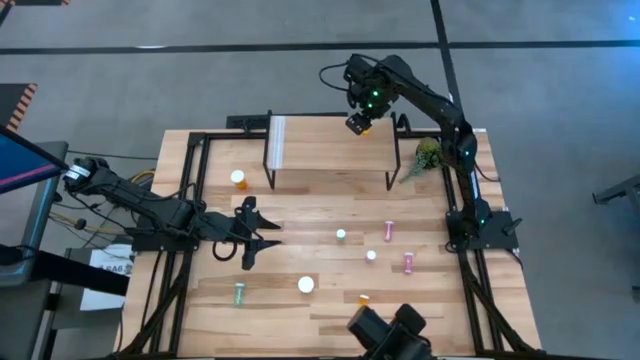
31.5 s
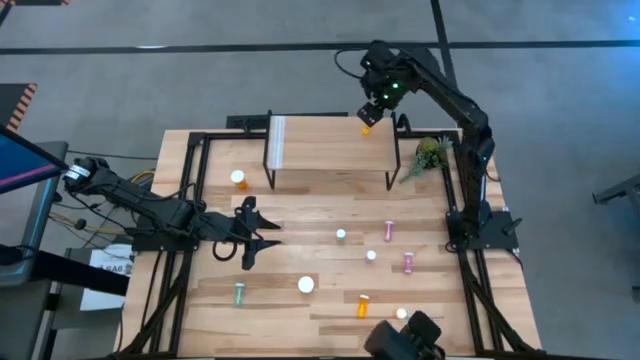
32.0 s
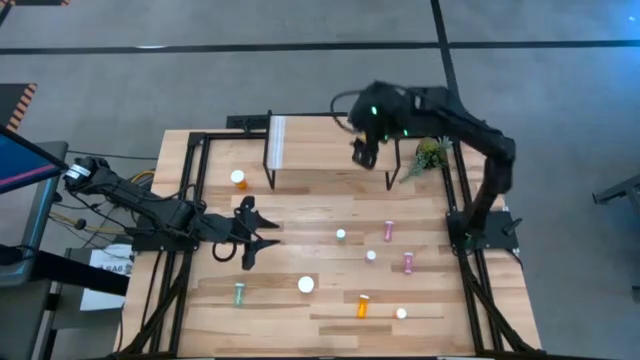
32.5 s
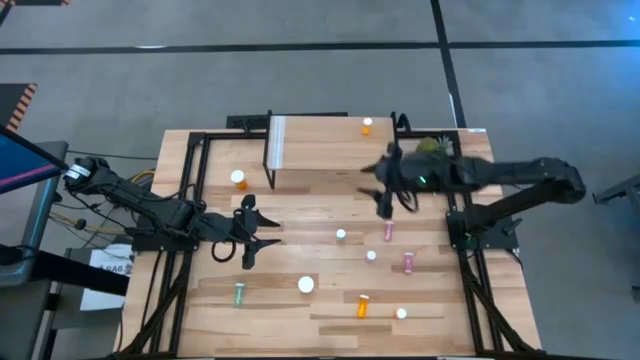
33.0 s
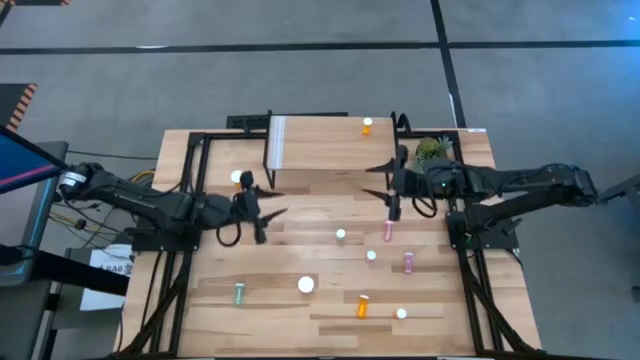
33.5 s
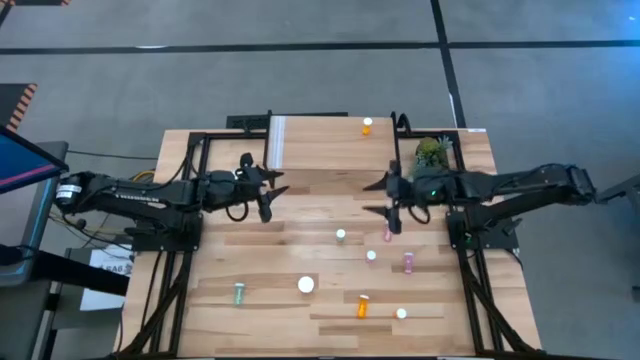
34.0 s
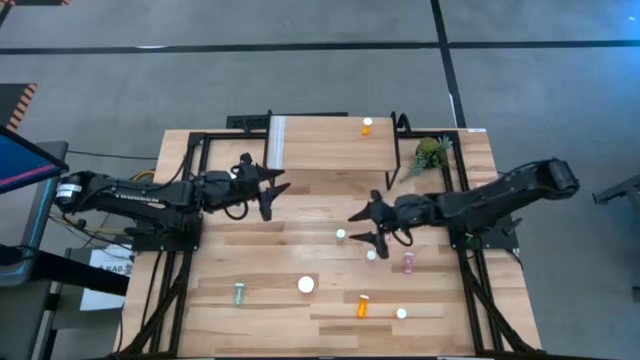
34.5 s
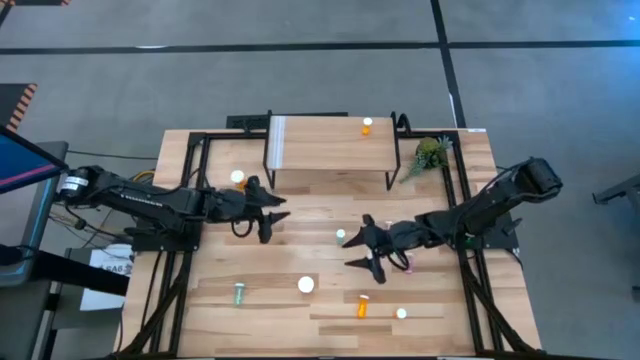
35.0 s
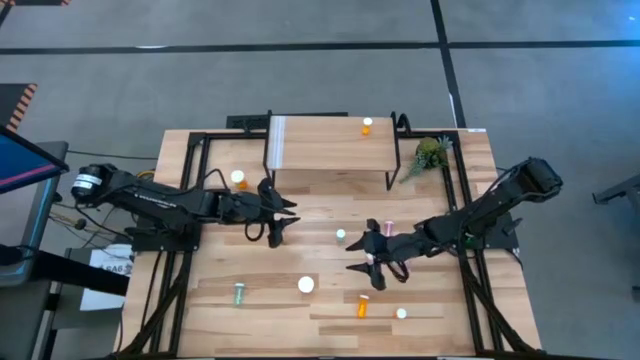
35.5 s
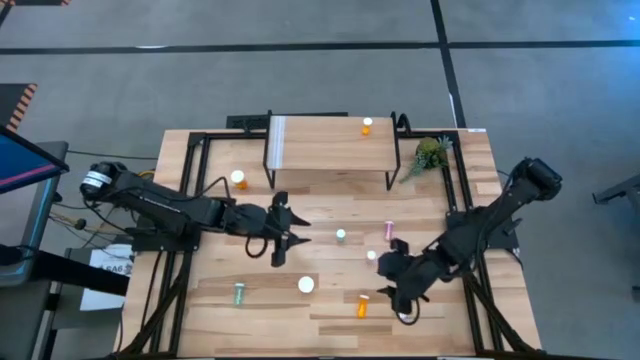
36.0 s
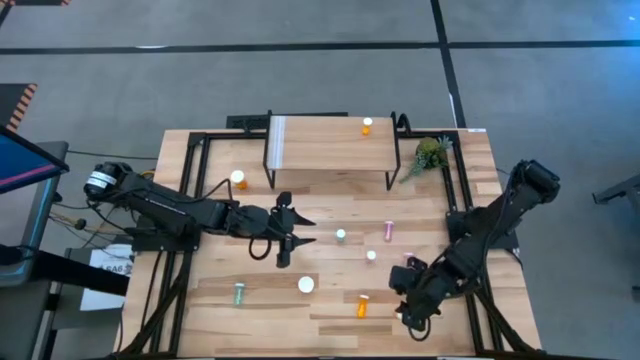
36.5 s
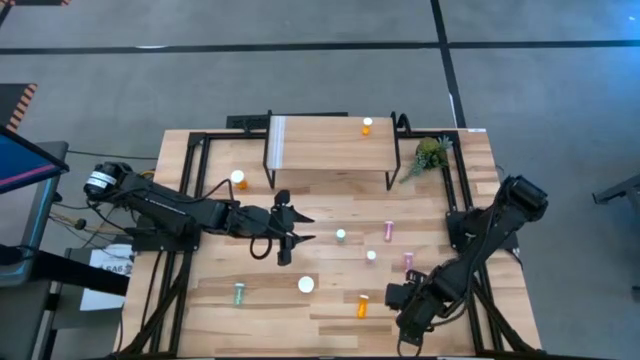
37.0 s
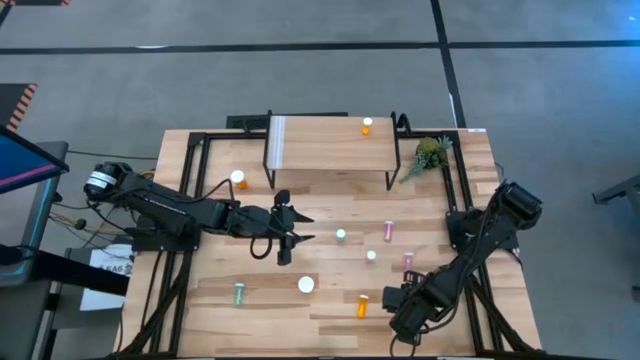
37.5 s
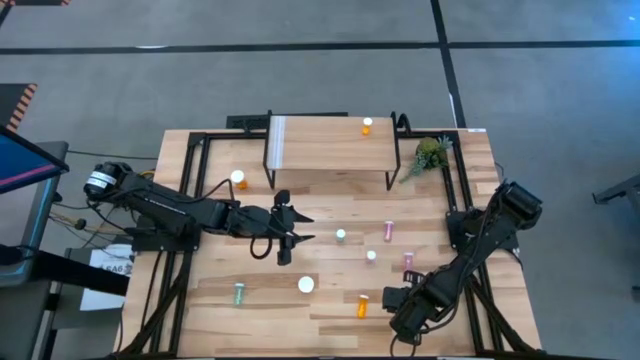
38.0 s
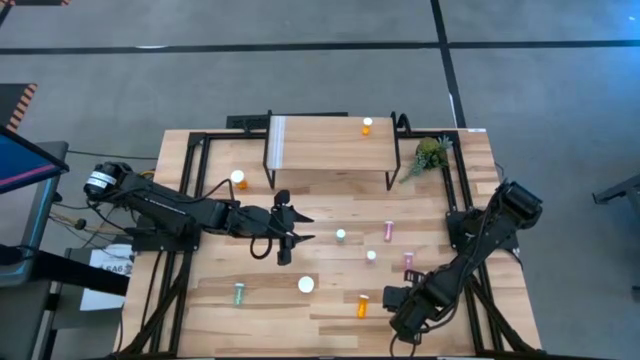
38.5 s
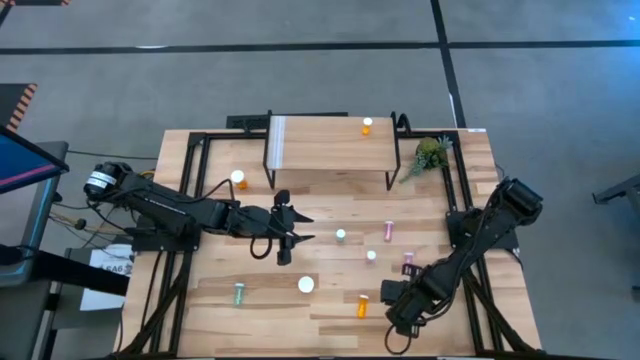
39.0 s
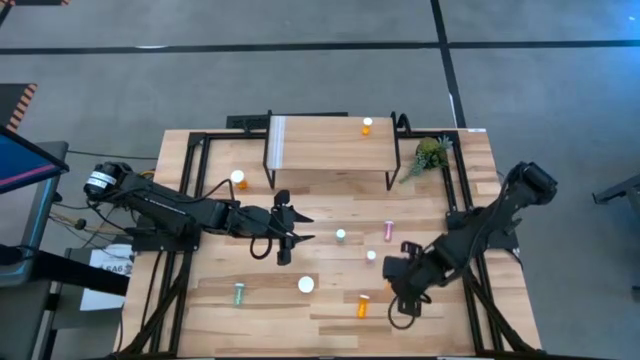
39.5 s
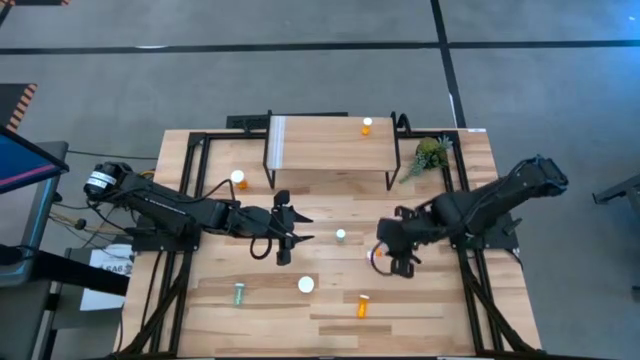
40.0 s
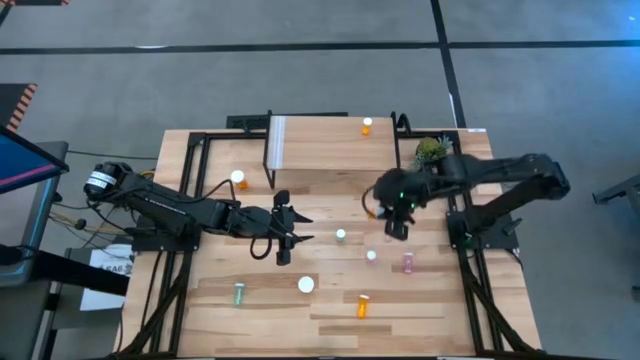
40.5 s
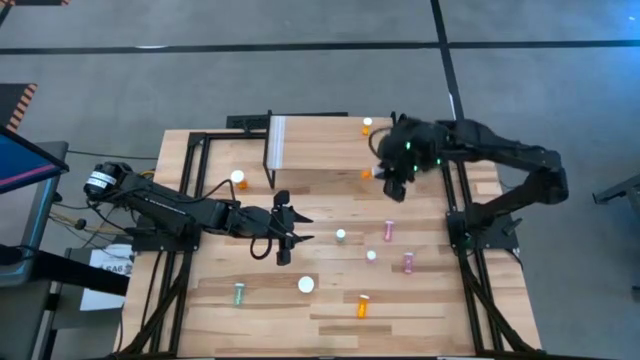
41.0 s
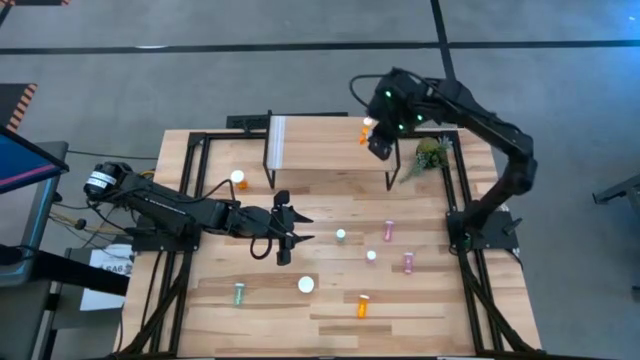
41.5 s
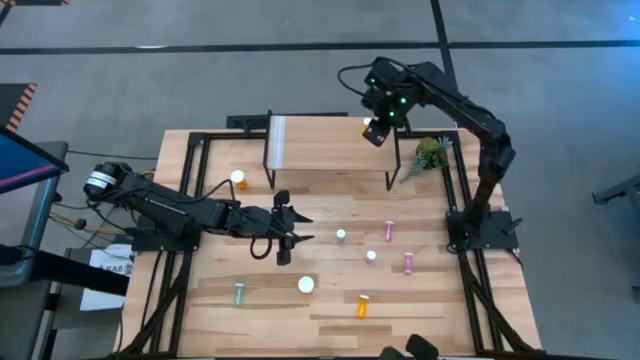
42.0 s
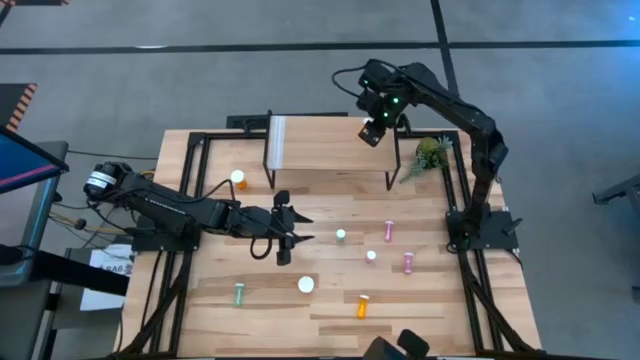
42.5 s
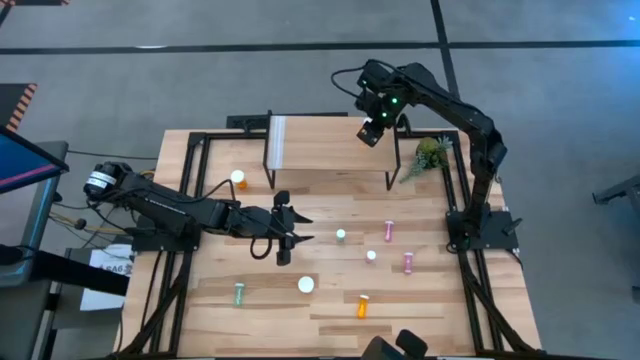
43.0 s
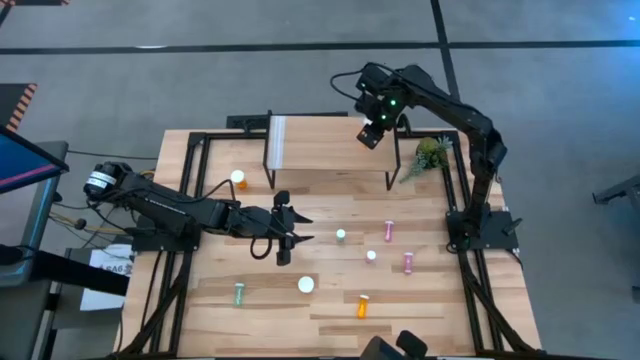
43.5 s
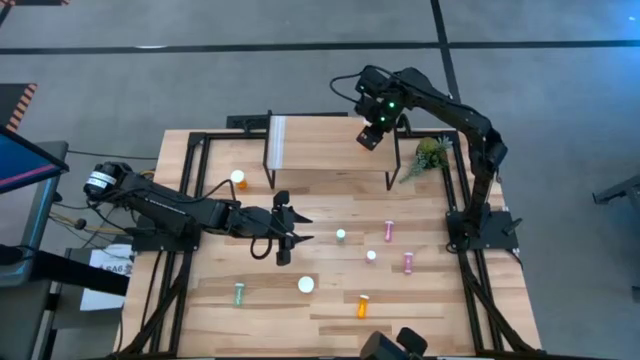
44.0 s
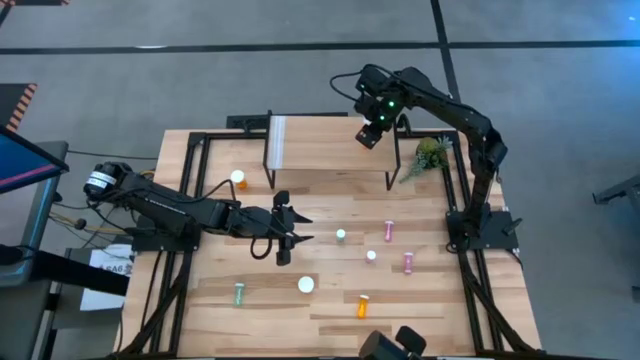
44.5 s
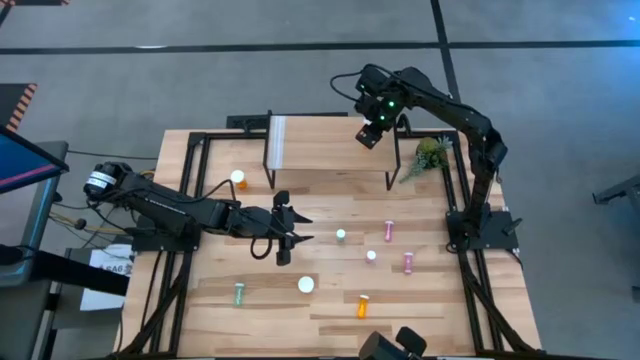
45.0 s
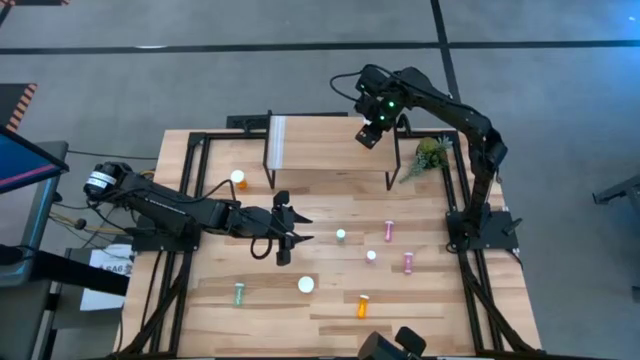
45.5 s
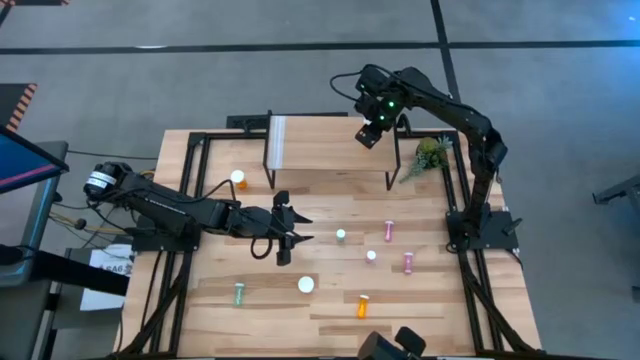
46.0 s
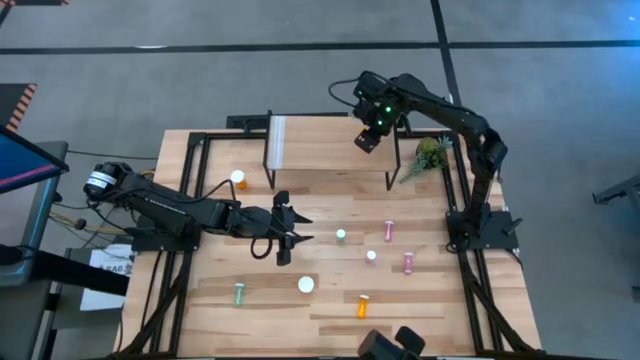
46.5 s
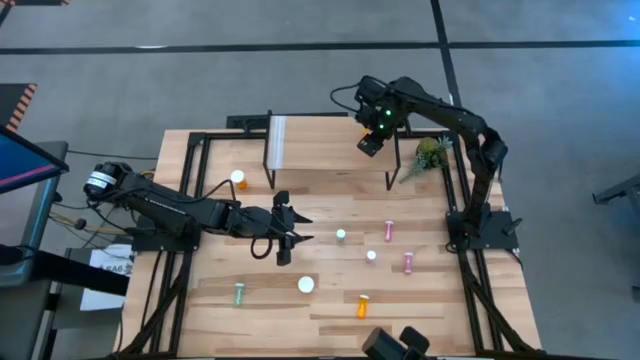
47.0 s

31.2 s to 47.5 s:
Task: Pick and place medicine bottles onto shelf by color
Put the right small orange pill bottle on the shelf aligned with the small orange pill bottle

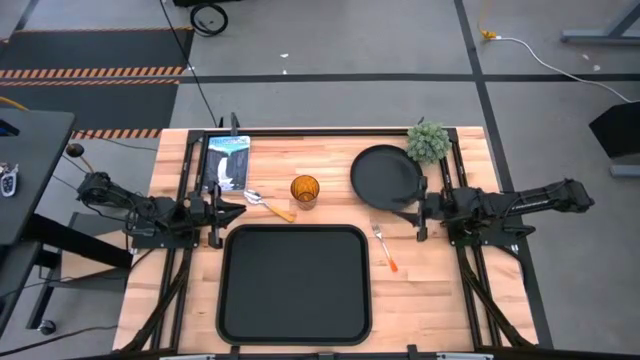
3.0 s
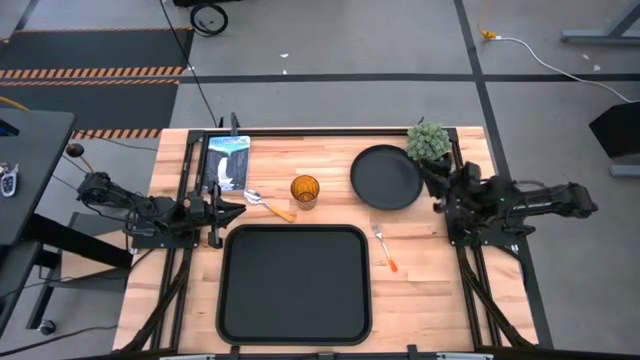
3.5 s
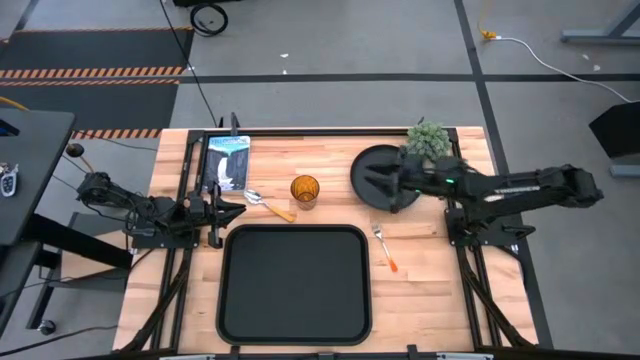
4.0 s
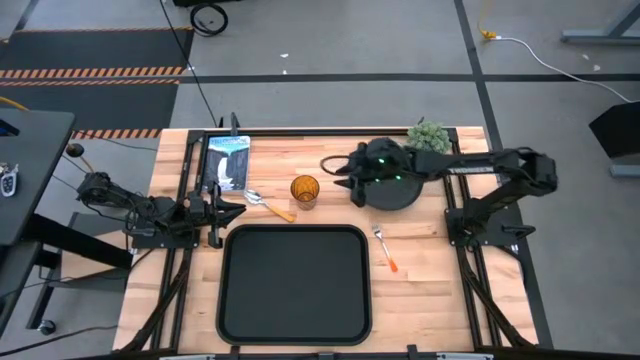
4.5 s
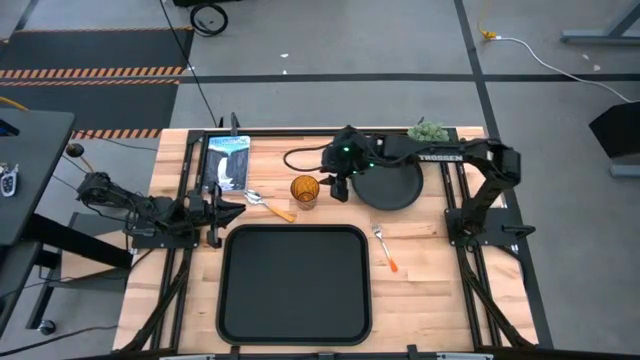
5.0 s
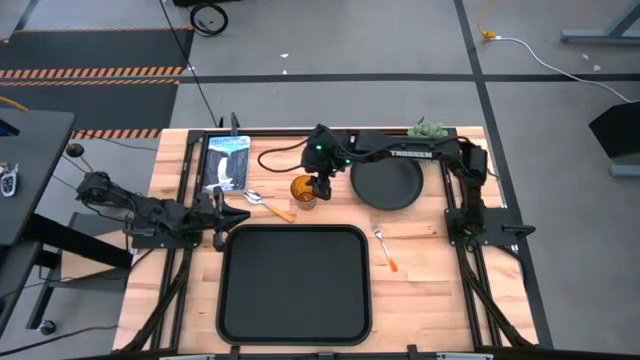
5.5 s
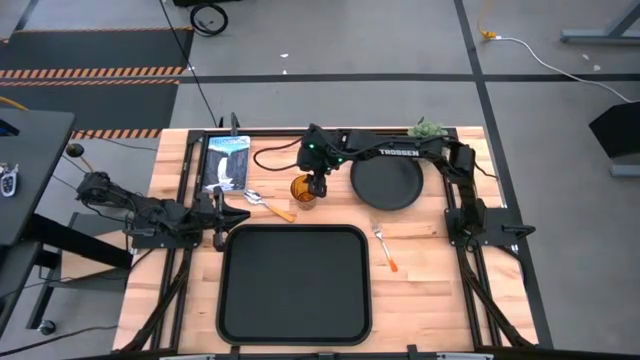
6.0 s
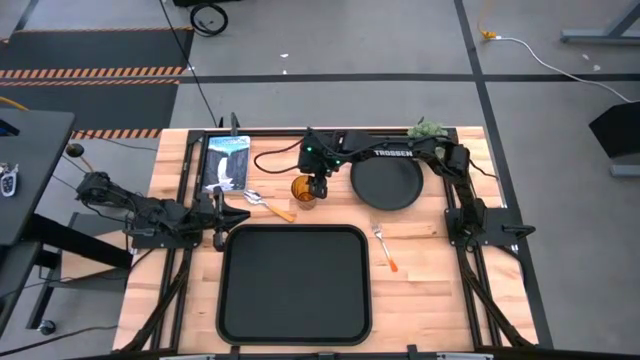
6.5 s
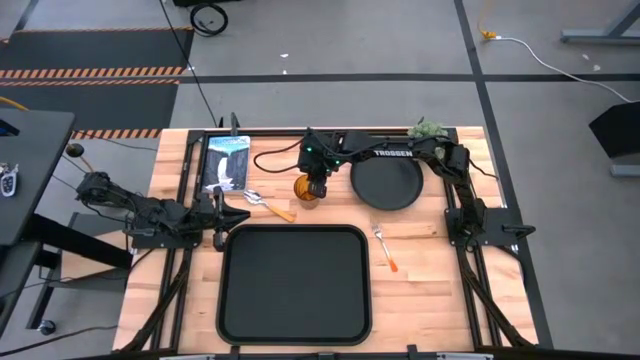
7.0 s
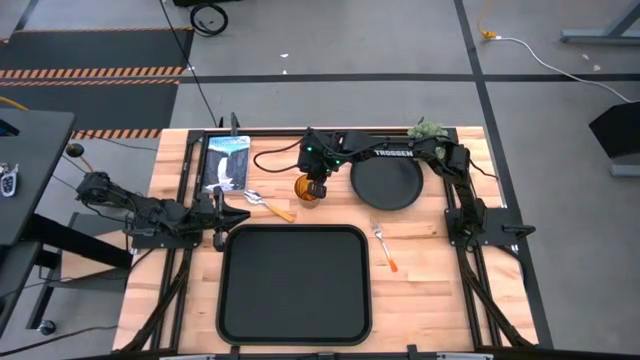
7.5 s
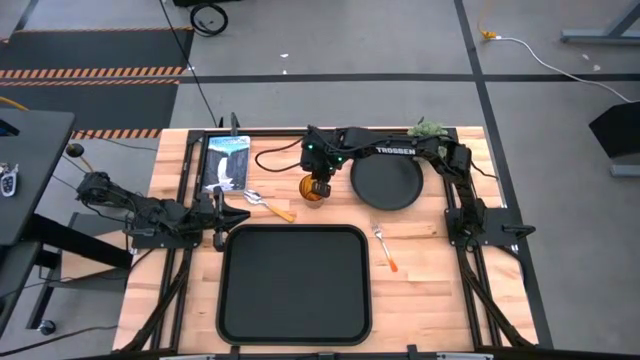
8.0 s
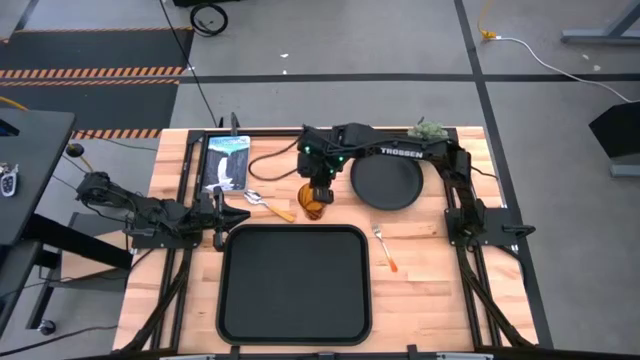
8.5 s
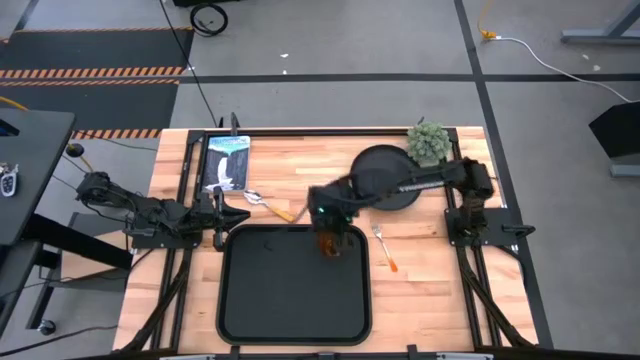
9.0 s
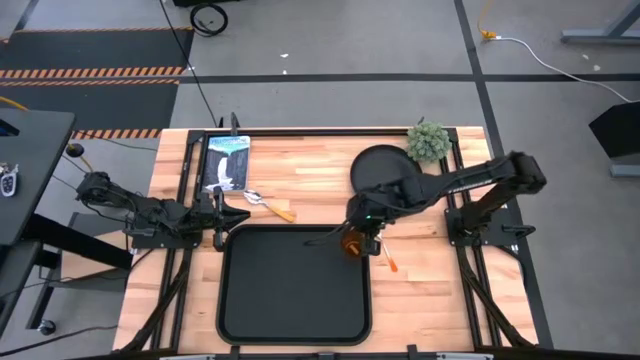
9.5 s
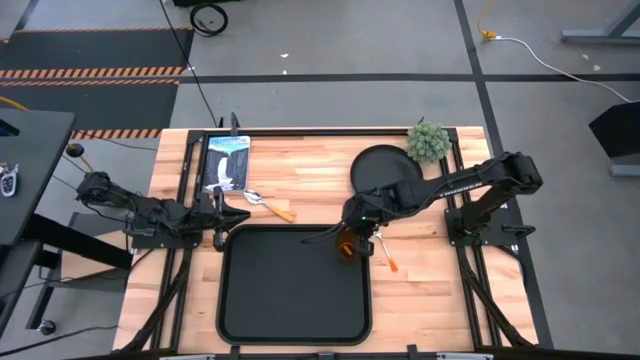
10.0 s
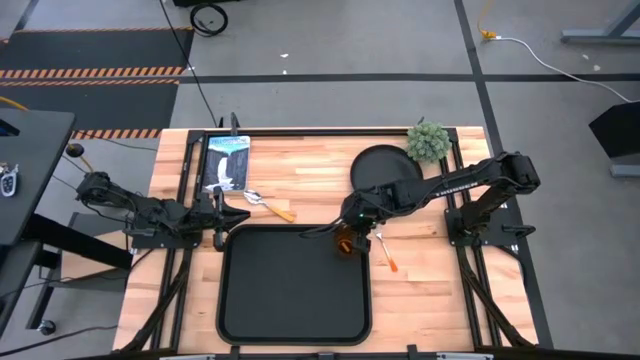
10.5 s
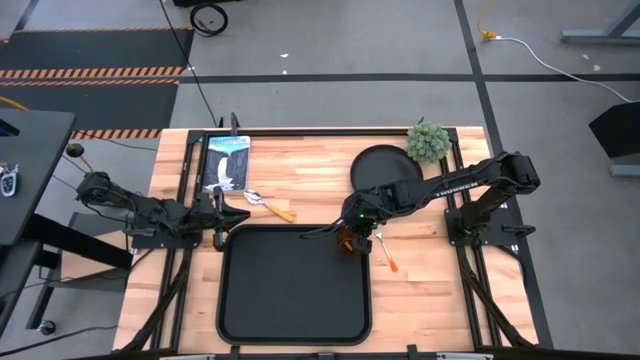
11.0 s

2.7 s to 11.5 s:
Task: Pick and place plate/cup/fork/spoon on tray
Put the brown glass in the top right corner of the black tray
